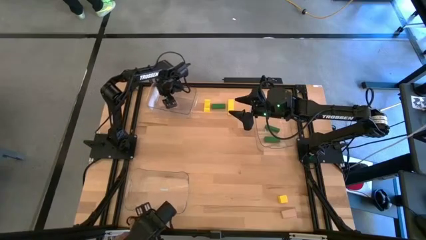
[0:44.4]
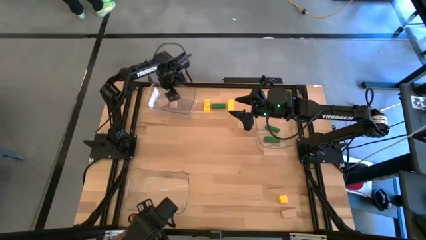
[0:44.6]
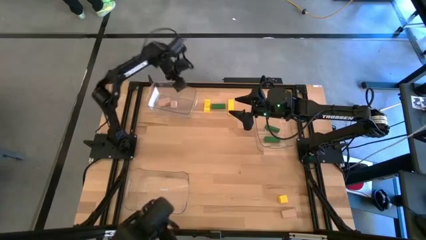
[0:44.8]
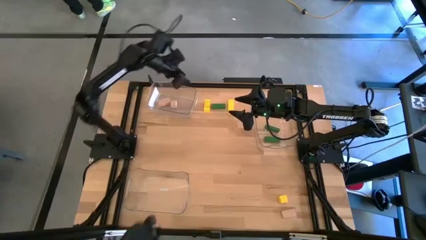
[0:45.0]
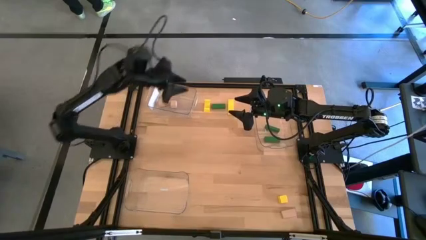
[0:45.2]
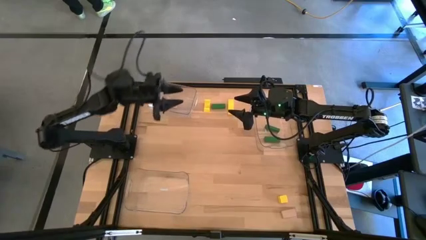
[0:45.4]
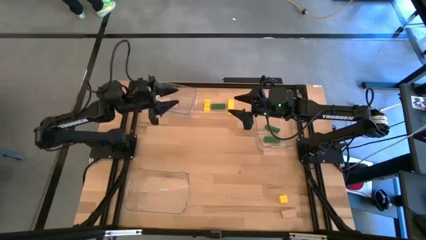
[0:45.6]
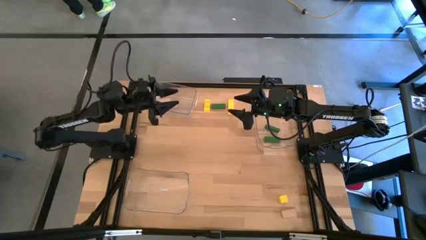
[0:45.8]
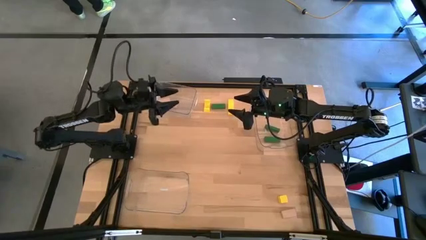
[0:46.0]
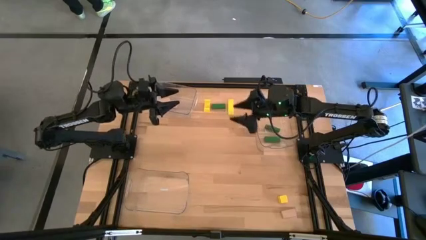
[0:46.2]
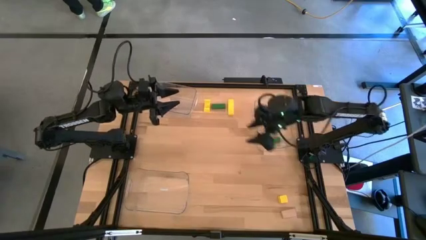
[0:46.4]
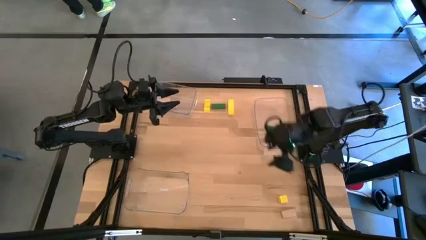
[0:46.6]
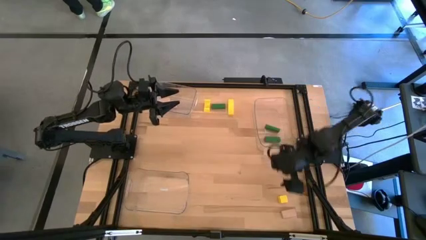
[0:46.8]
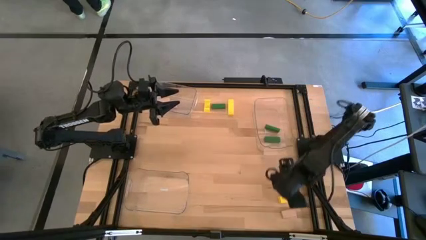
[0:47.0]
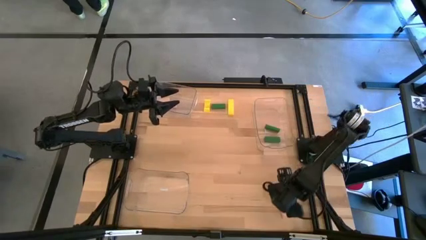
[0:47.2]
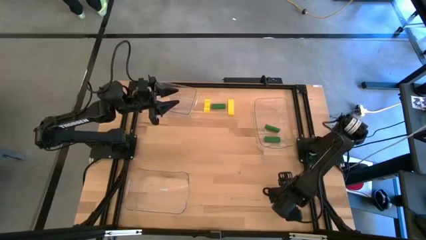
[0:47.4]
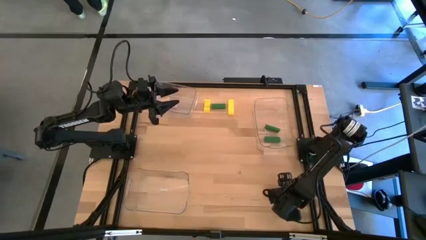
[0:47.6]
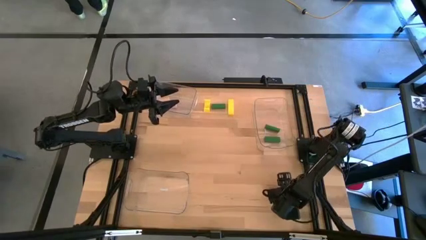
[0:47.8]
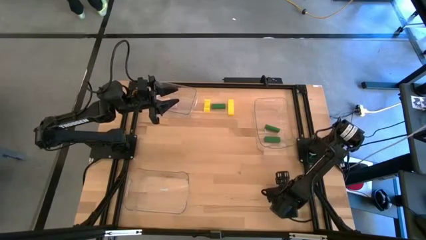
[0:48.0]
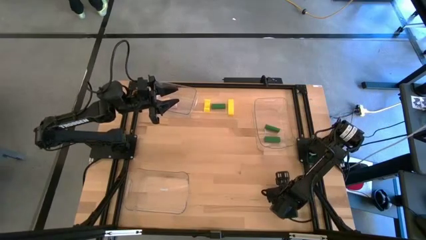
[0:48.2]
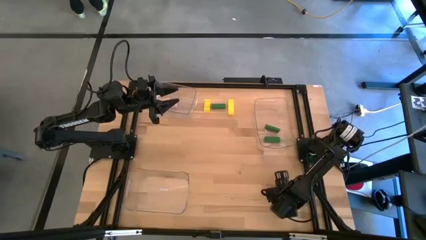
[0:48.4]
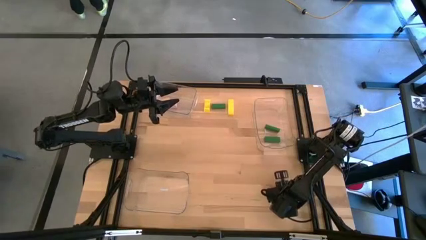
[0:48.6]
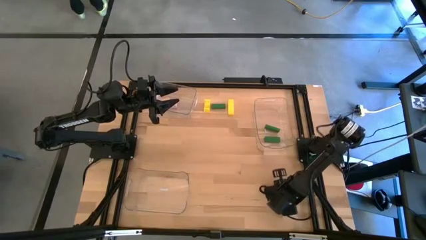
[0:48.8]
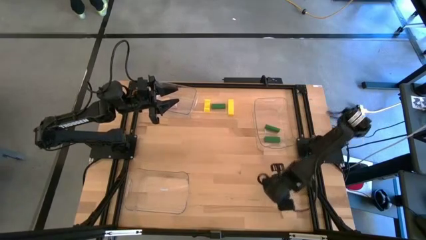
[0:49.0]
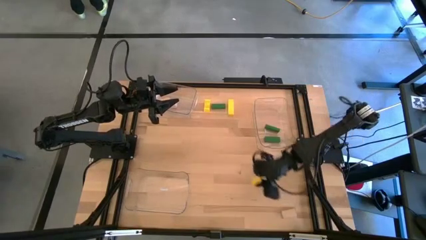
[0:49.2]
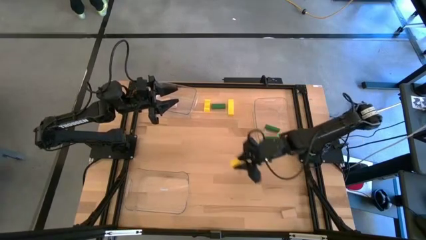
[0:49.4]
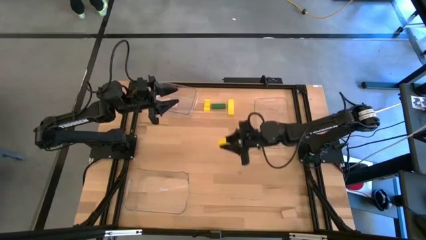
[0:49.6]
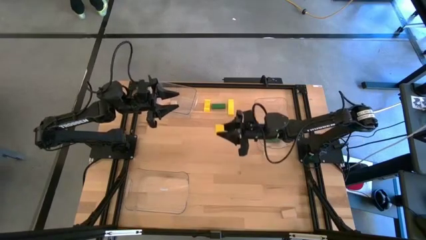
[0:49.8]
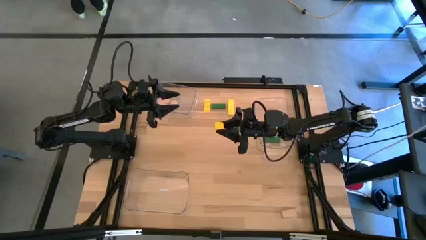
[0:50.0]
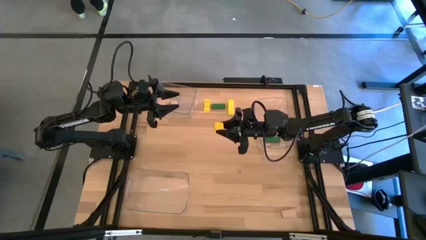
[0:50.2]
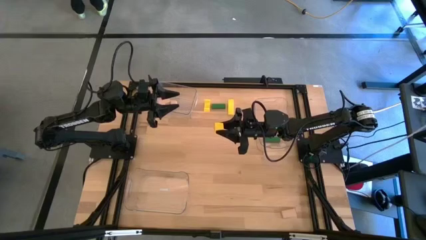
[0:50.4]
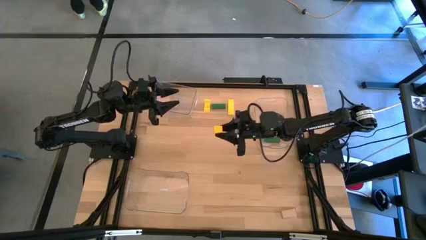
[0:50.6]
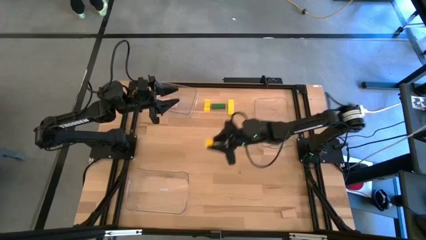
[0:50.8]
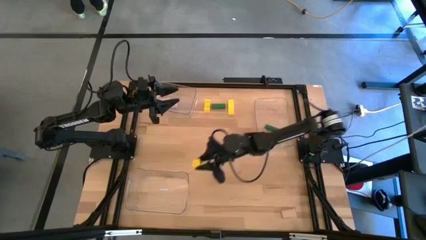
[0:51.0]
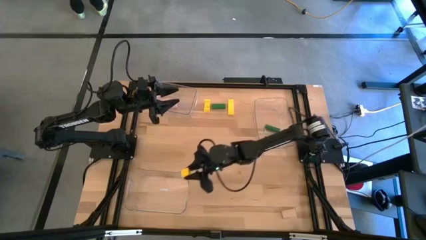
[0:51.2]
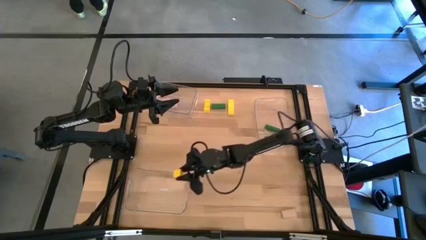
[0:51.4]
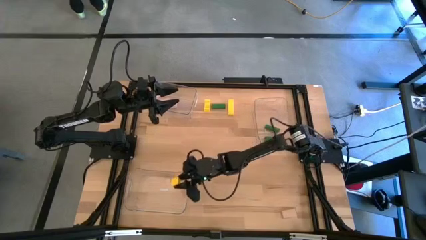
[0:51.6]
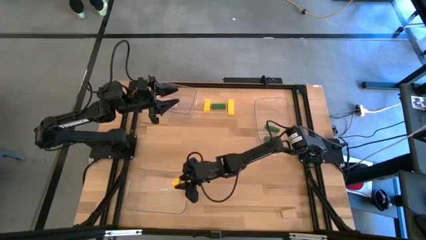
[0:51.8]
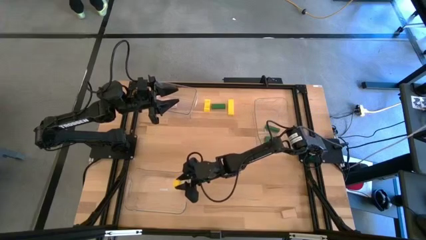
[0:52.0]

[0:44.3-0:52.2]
Task: Sort & place blocks by color
Put the bottom yellow block into the bottom left transparent bin

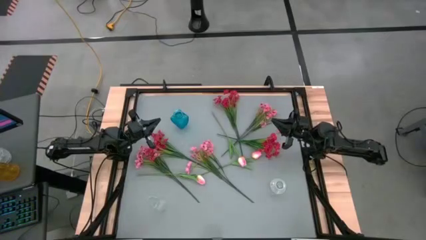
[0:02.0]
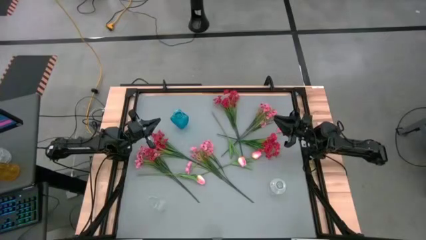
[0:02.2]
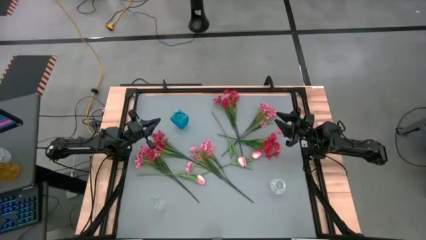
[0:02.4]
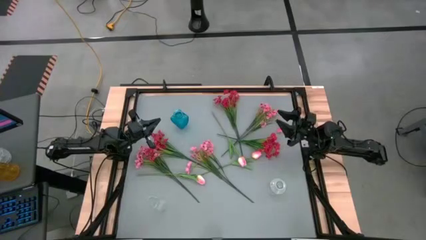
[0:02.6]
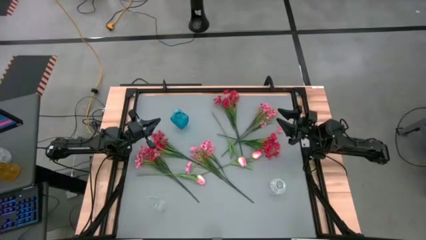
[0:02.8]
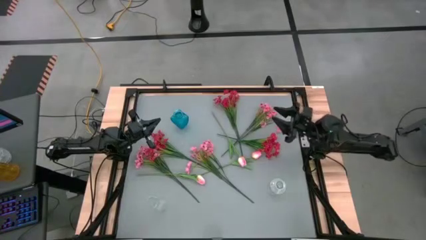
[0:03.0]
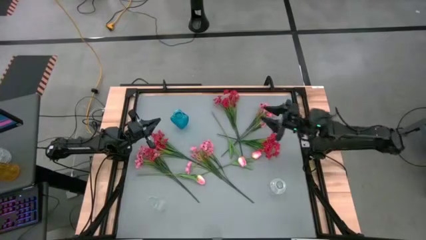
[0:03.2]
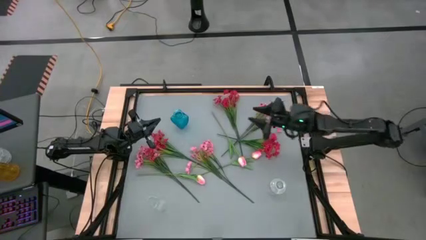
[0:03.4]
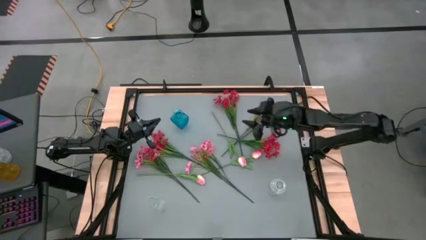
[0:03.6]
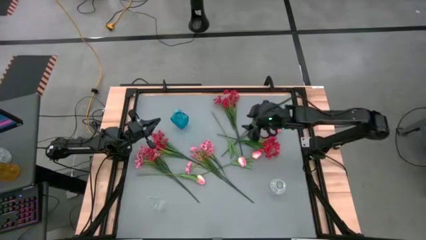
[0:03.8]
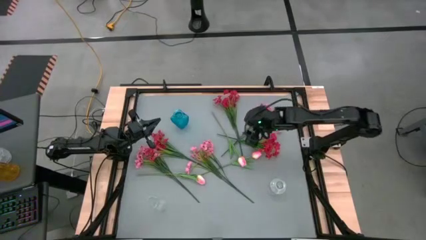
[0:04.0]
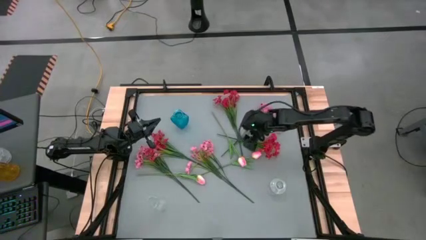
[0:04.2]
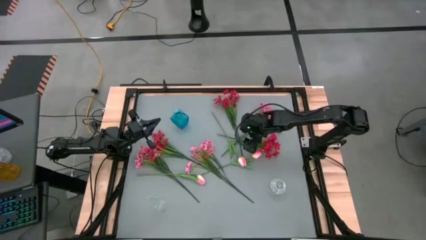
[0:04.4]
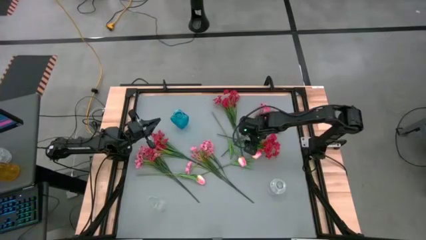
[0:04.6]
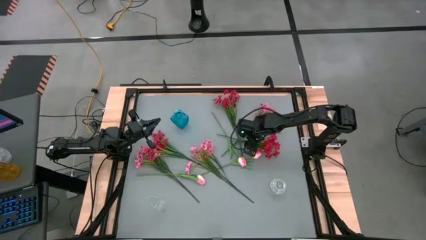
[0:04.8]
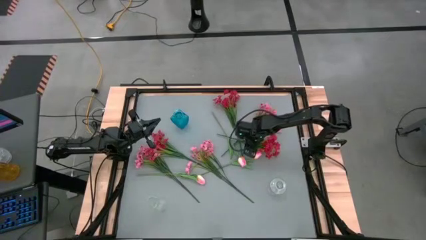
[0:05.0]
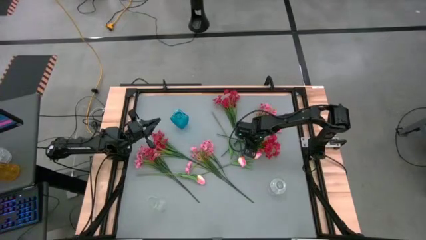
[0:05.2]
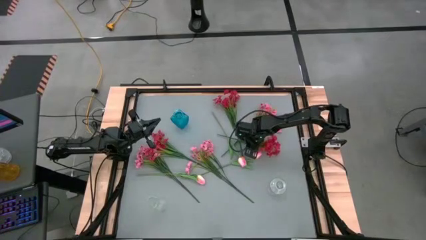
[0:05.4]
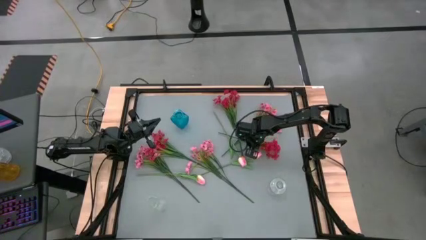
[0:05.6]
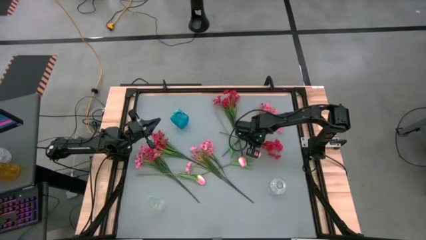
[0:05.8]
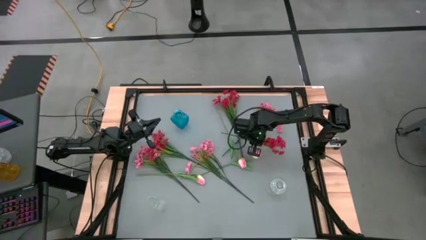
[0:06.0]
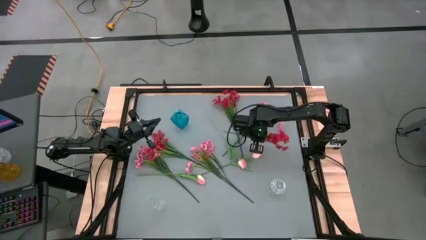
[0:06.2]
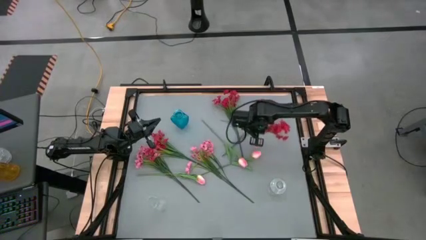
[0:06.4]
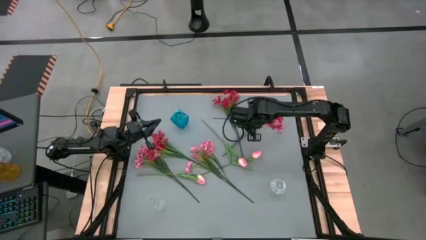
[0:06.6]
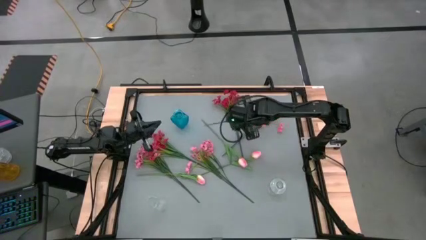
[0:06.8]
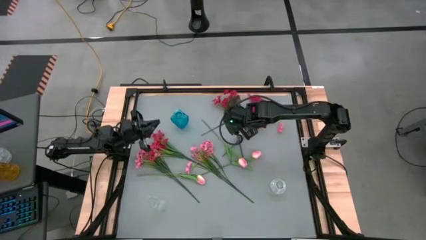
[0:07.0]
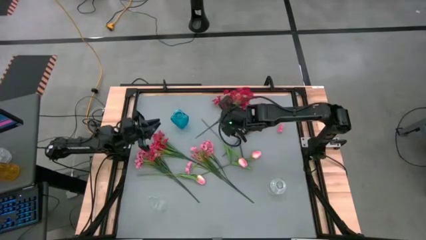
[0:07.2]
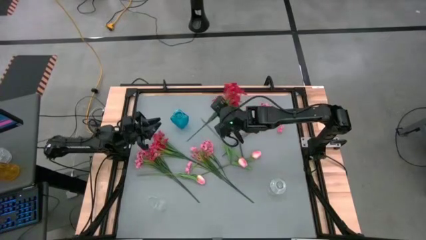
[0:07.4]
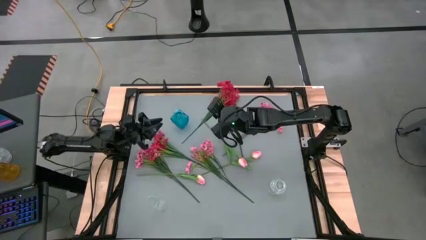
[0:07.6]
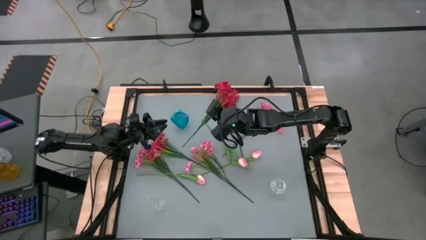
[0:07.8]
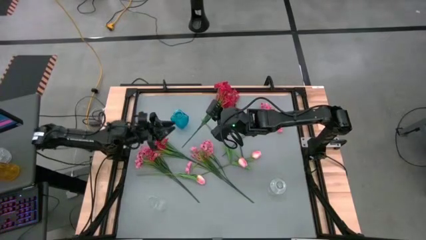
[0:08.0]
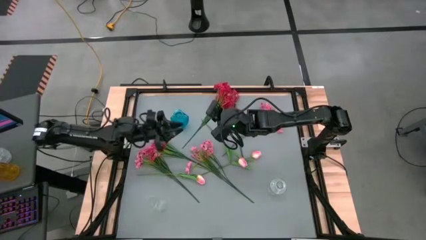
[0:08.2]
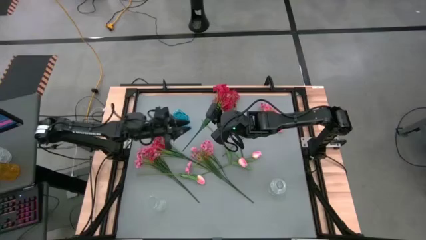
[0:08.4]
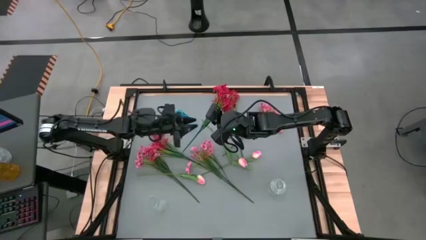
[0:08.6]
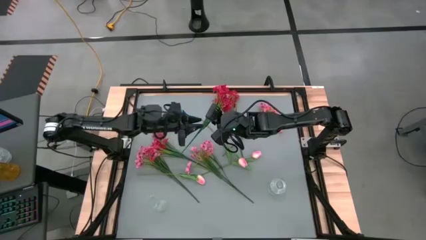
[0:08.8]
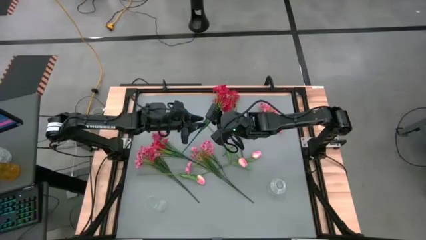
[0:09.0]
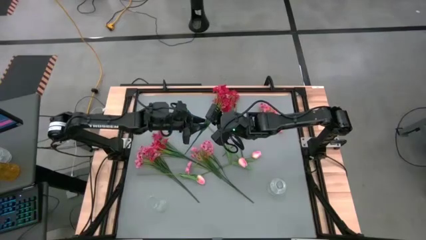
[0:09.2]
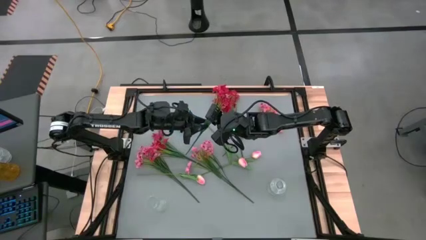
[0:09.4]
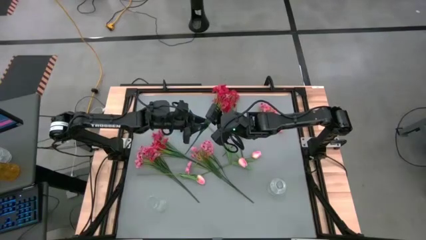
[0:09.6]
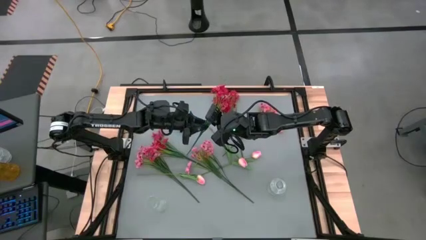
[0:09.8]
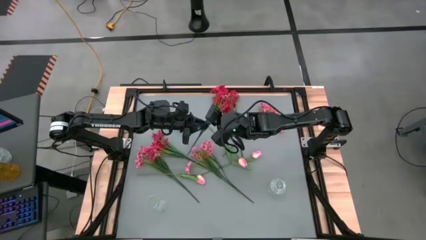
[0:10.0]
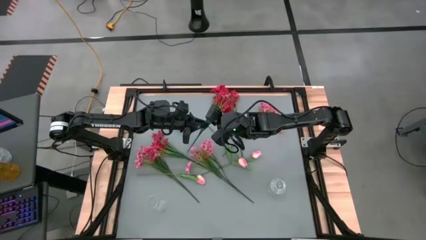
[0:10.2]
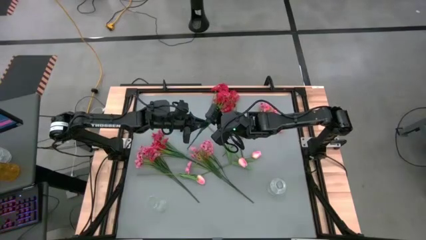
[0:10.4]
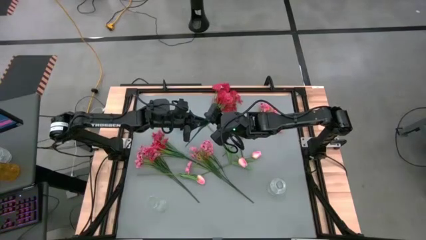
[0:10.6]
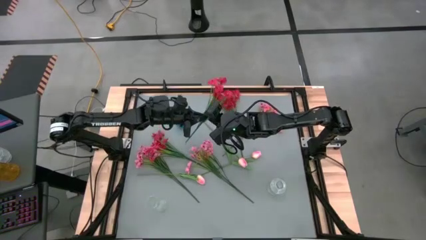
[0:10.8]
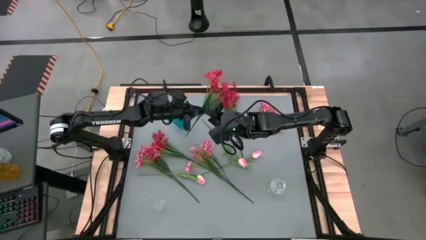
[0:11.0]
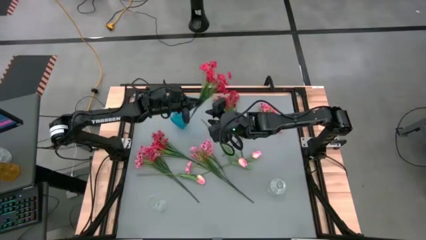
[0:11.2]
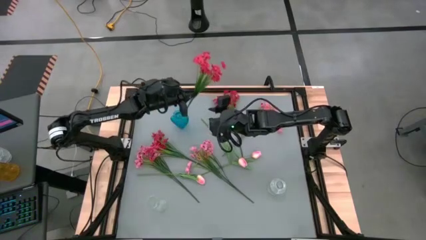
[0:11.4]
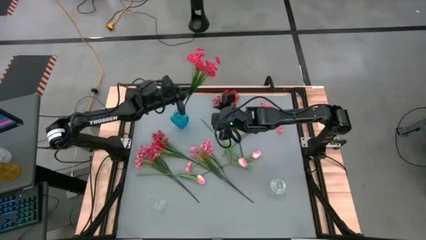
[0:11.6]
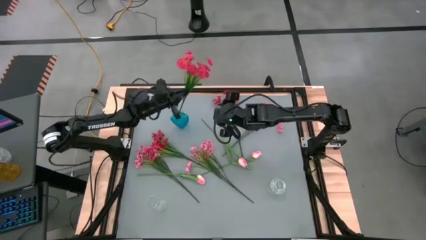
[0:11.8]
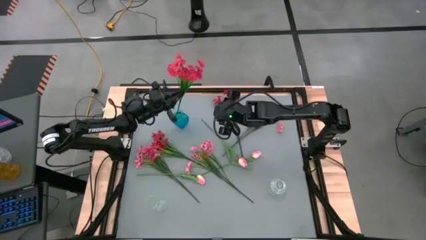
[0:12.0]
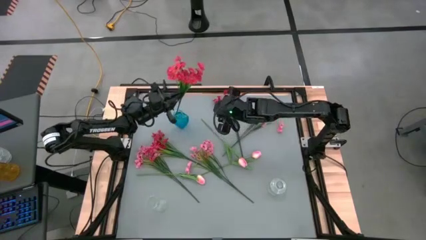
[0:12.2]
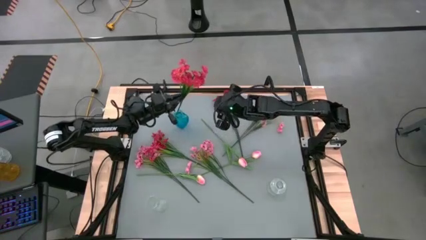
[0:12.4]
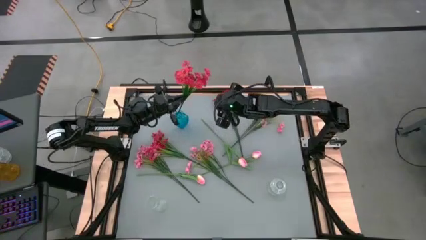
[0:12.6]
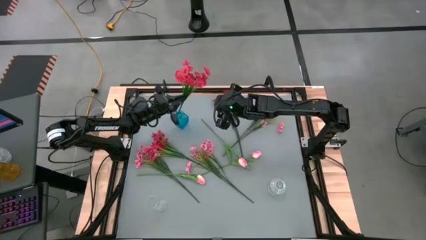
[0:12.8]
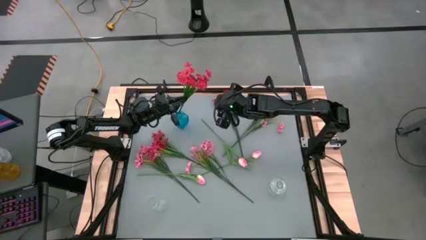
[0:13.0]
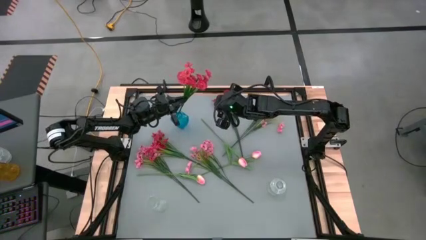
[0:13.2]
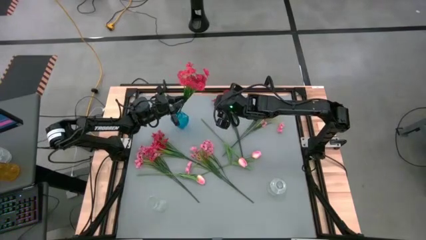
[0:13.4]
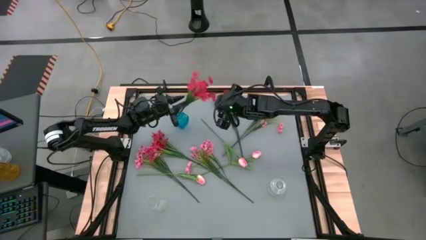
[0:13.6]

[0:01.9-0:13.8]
Task: Sort flowers into vase by color
Put the right red flower into the blue vase
